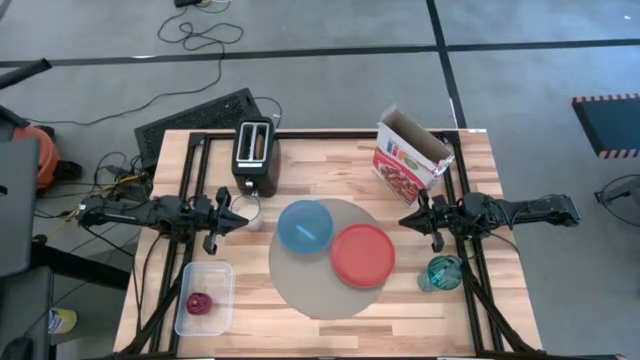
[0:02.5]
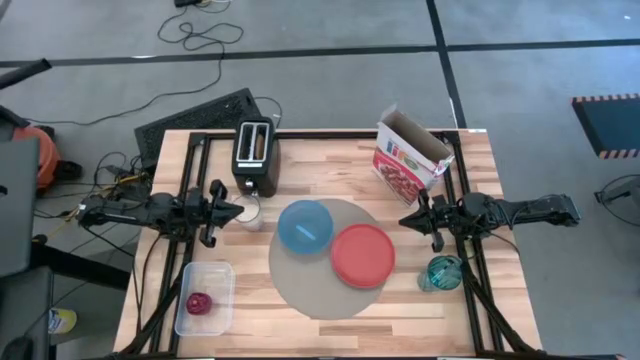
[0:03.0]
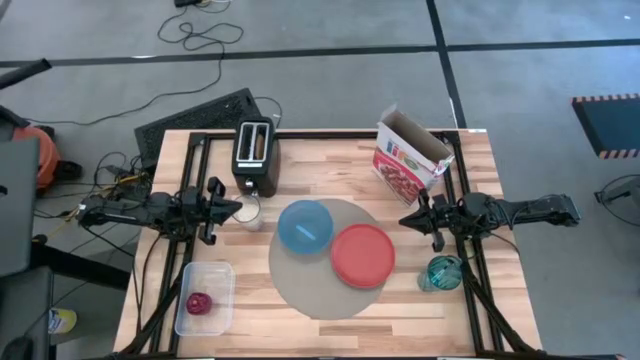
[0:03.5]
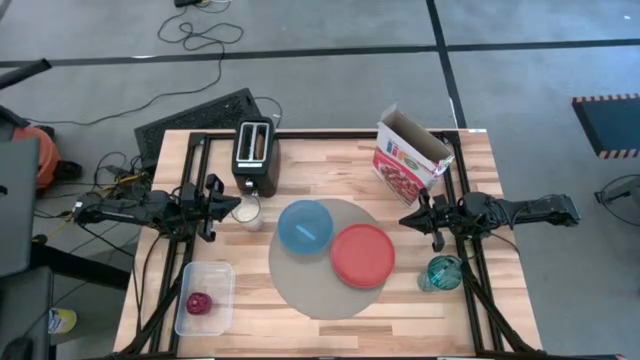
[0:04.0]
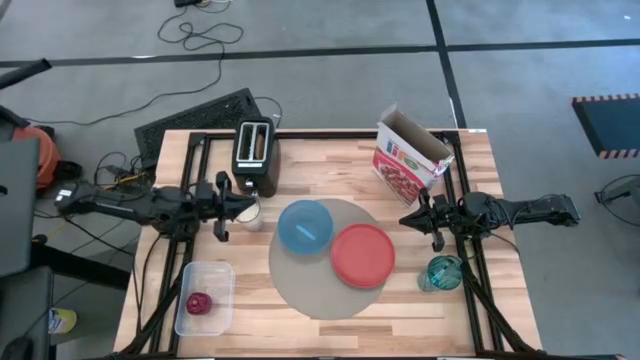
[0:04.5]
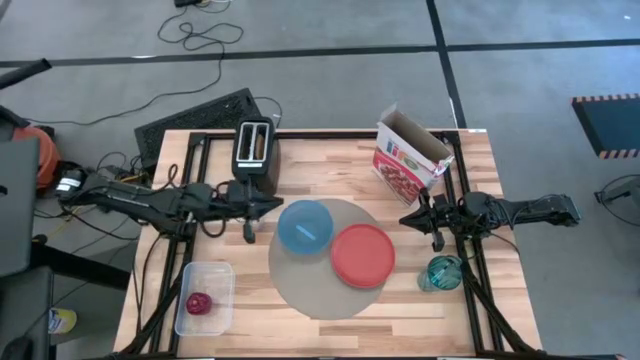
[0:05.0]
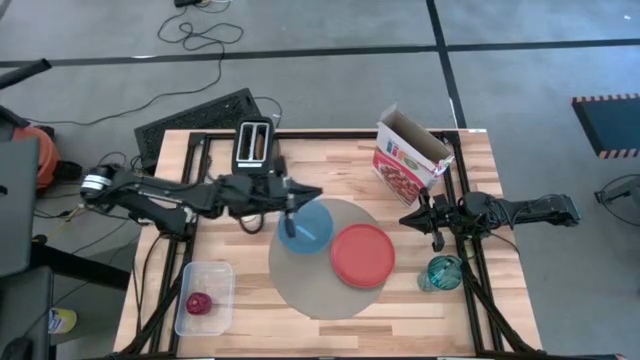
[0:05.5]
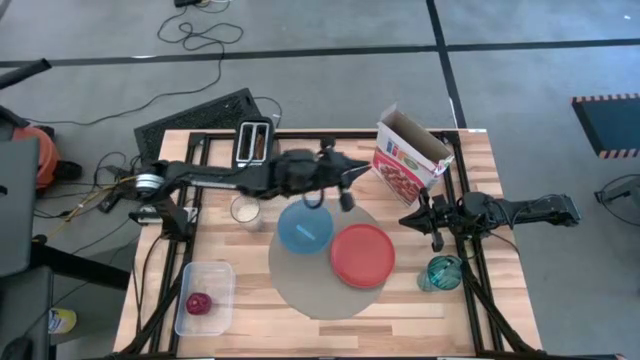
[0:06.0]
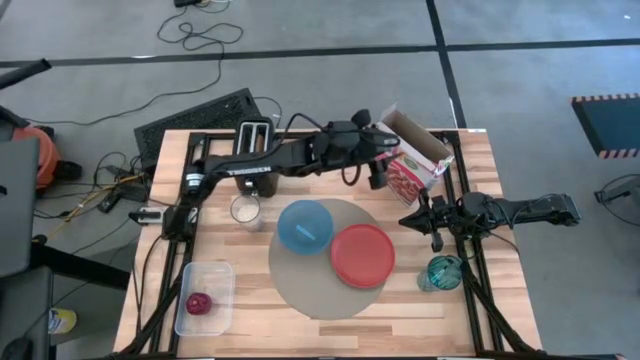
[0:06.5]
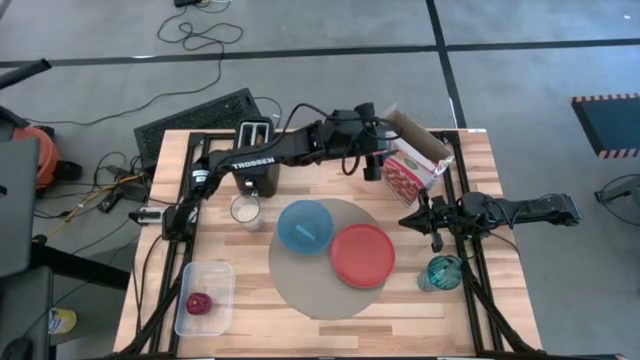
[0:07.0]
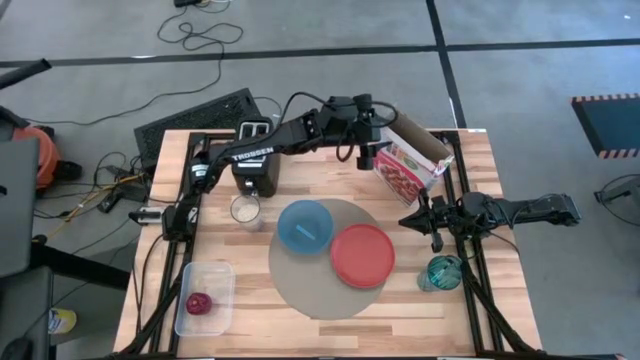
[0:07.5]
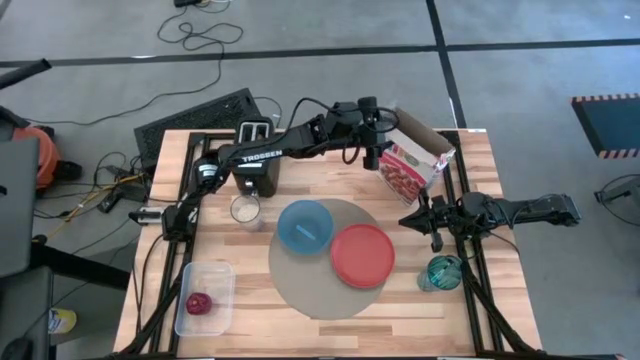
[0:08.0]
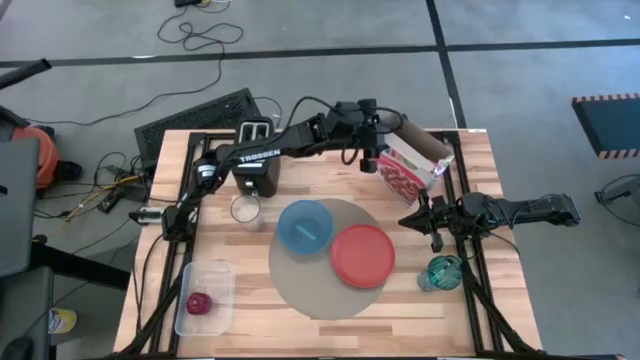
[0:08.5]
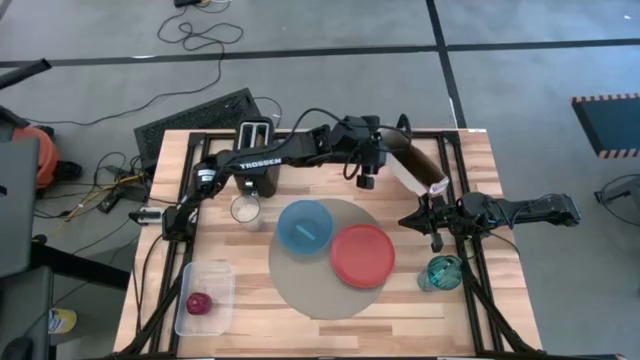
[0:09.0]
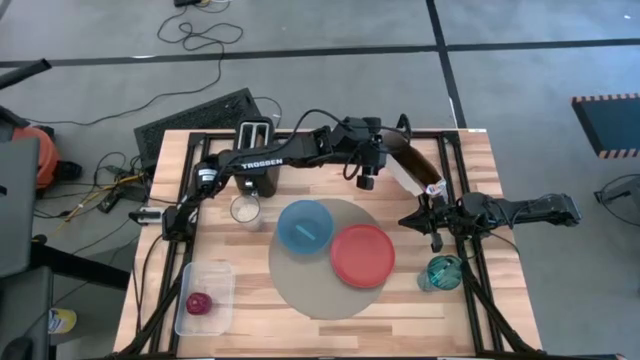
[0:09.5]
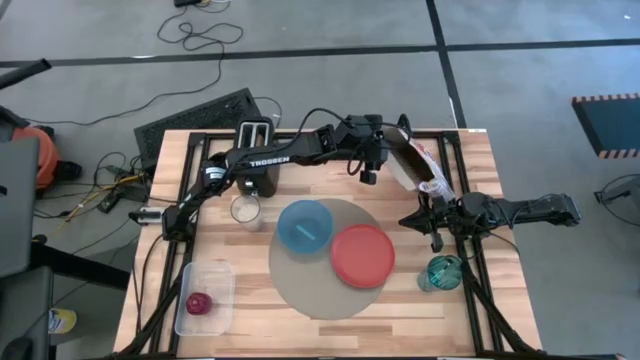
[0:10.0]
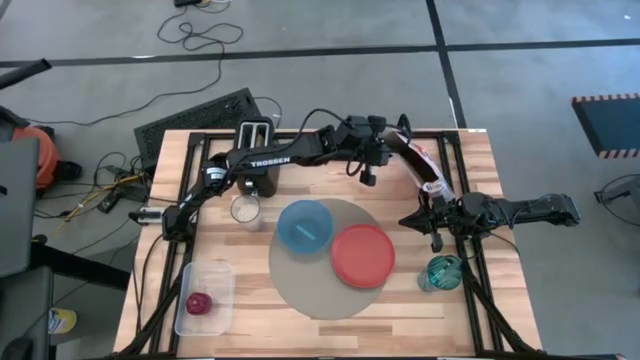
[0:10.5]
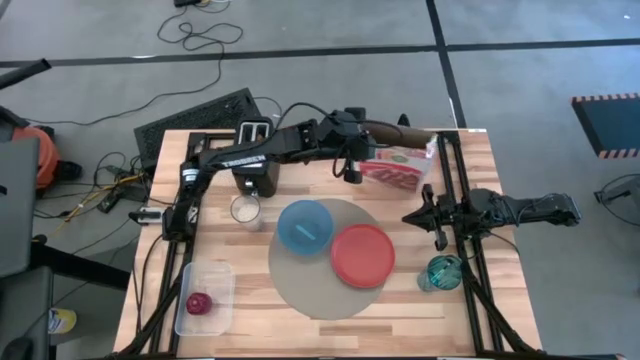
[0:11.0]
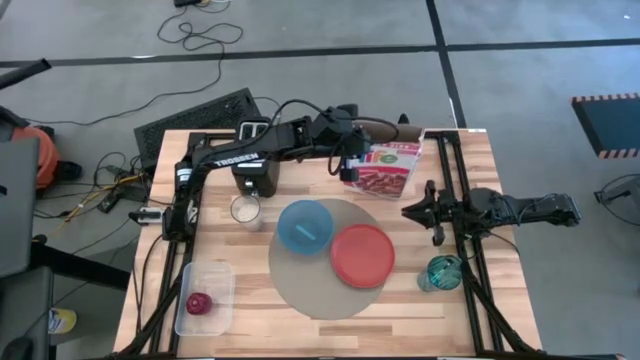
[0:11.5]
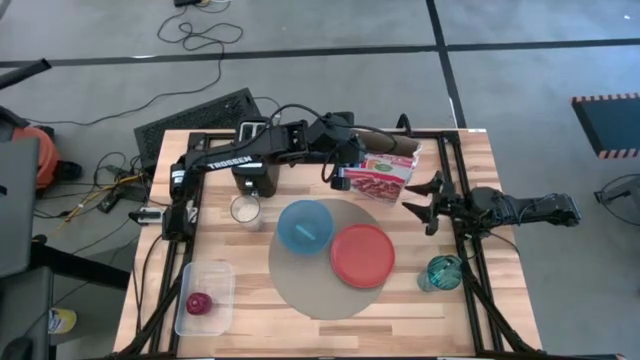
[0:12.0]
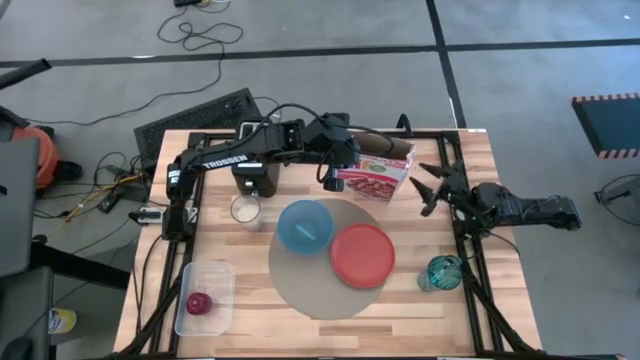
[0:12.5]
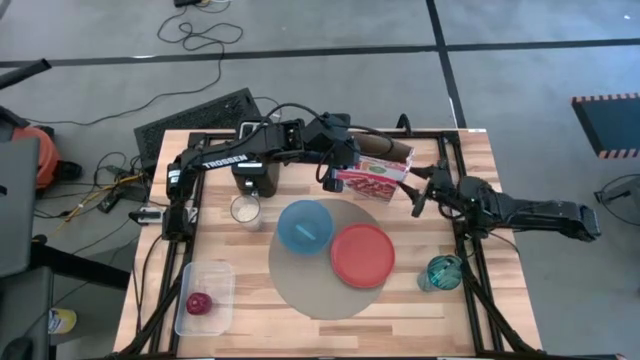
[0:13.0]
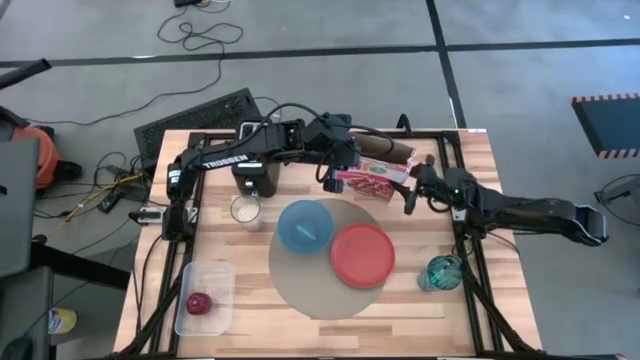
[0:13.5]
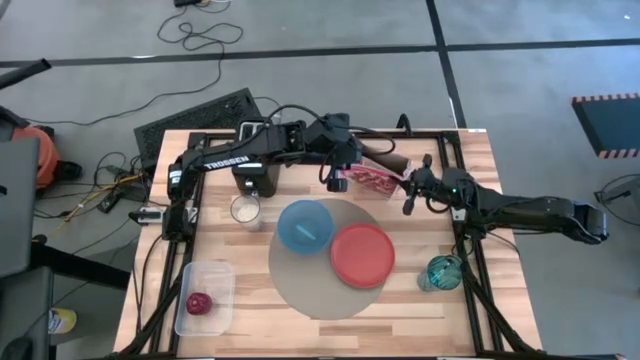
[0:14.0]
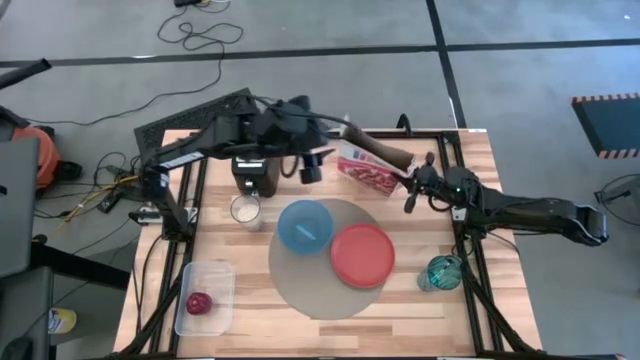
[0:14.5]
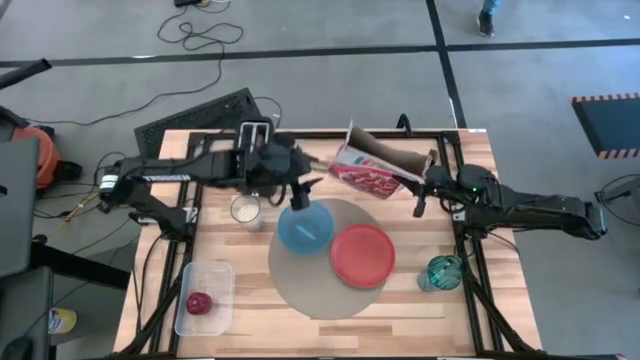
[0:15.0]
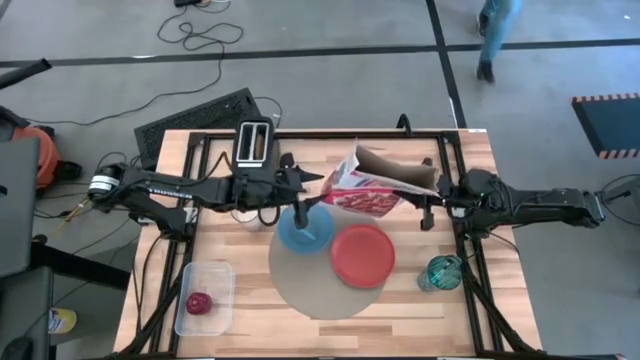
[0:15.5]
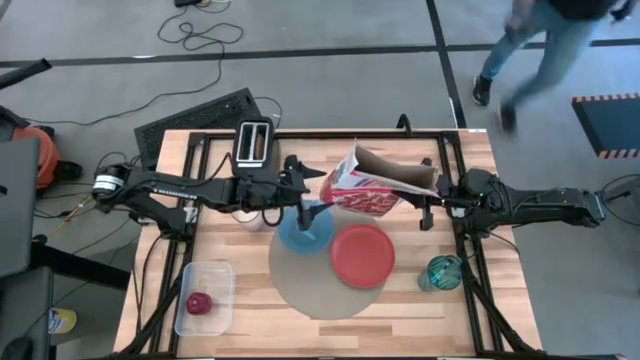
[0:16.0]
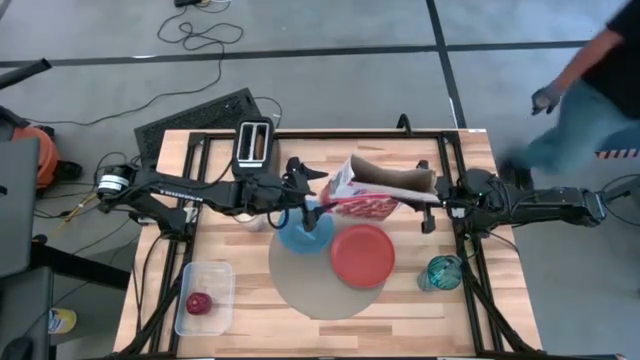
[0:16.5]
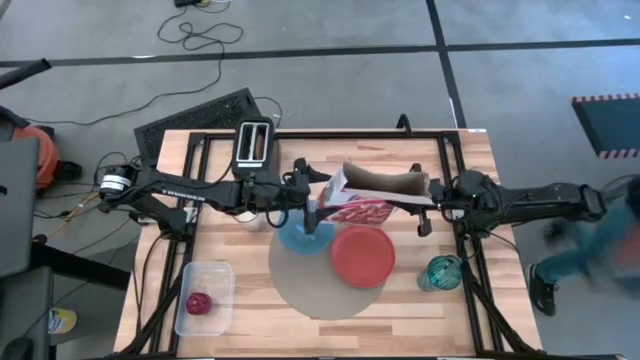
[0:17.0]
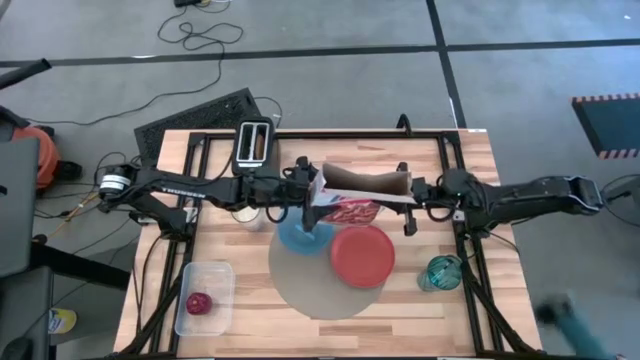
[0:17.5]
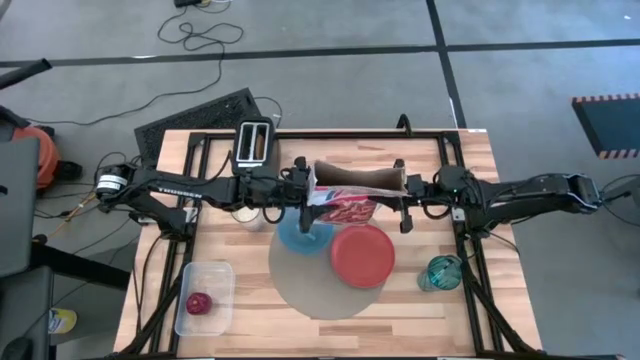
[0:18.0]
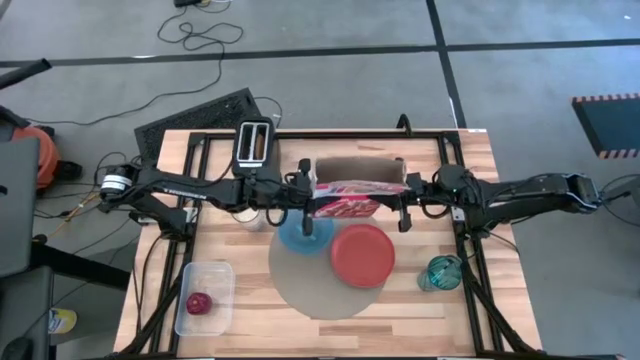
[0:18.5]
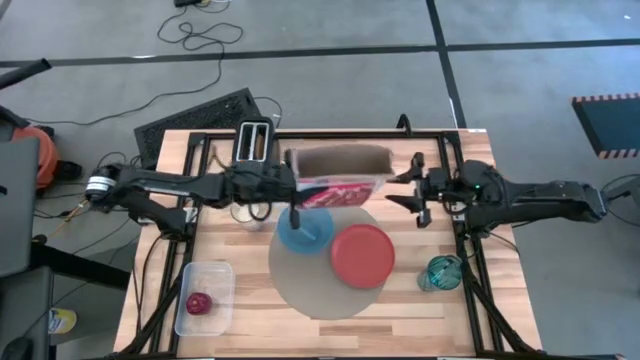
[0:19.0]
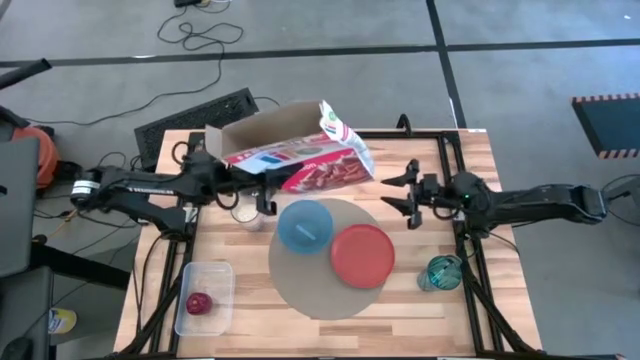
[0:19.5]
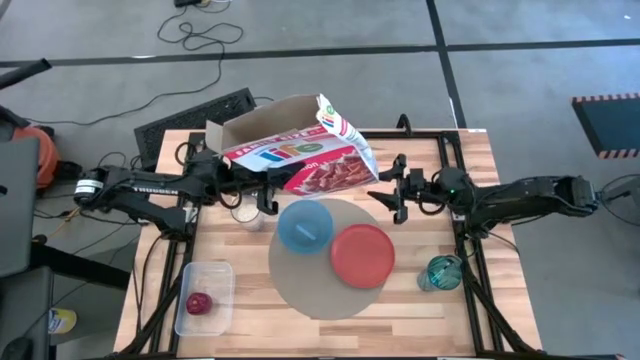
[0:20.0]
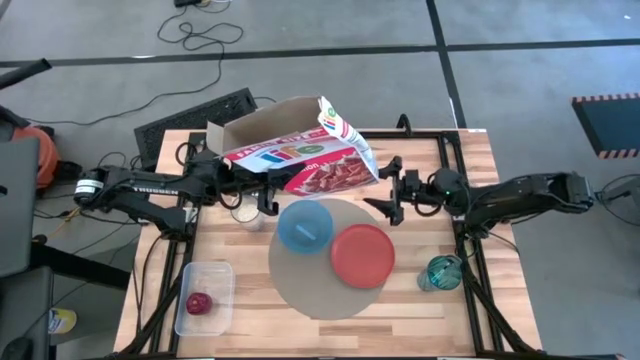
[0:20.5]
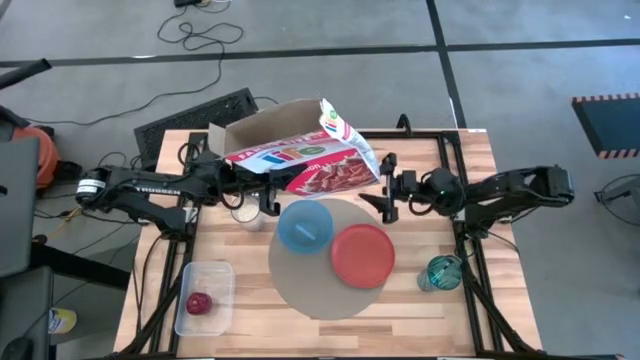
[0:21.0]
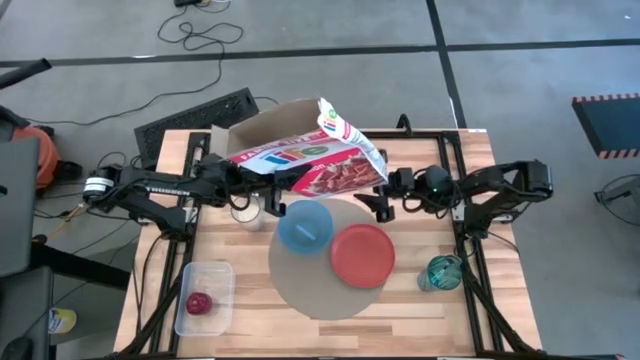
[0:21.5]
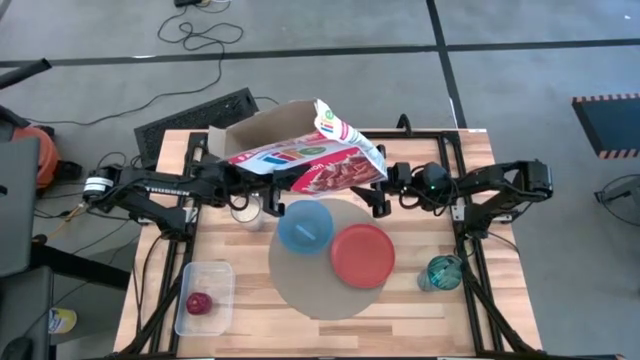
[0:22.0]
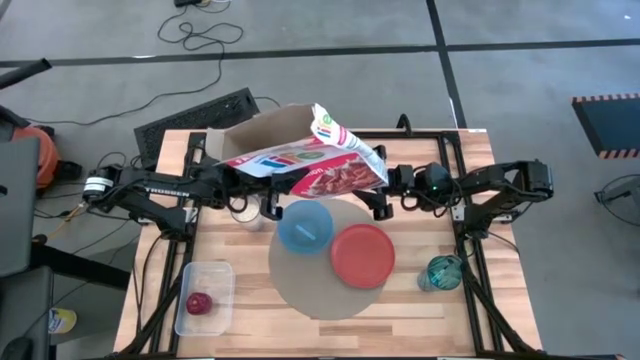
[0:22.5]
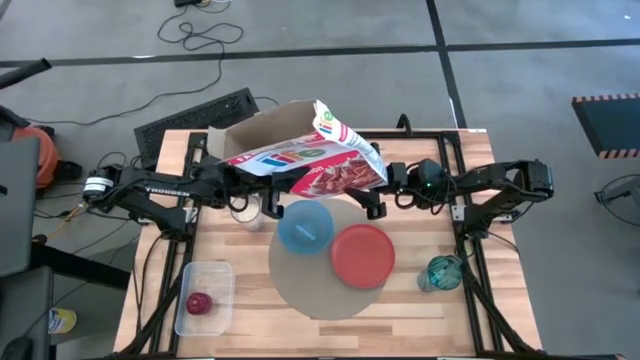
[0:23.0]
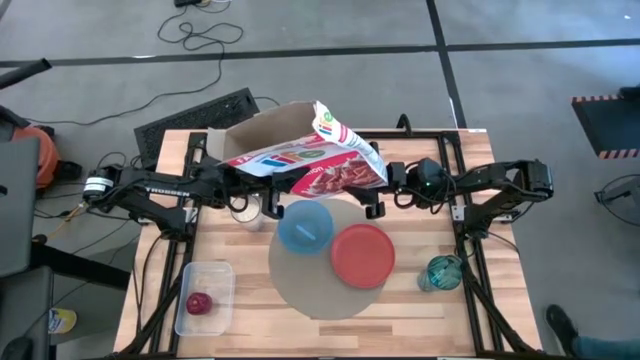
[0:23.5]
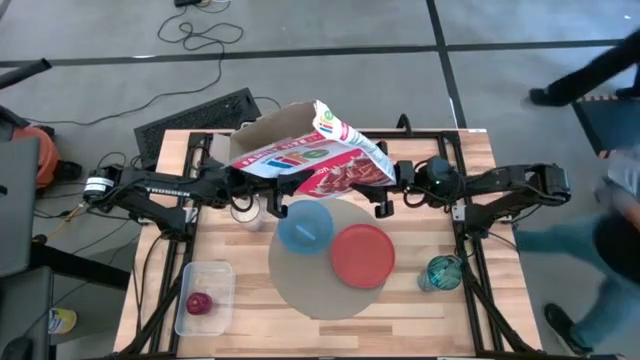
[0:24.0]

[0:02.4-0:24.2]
Task: Arrange a breakfast setting
Pour the cereal into the blue bowl
